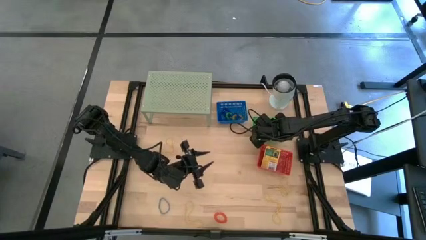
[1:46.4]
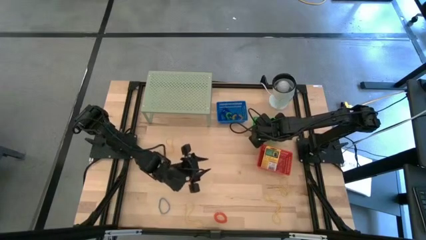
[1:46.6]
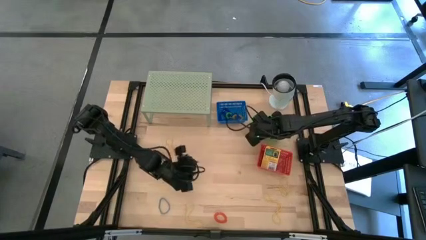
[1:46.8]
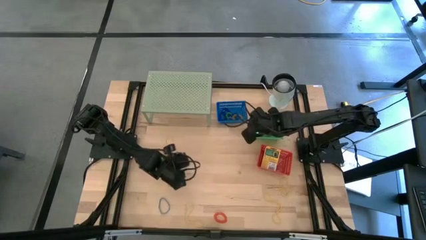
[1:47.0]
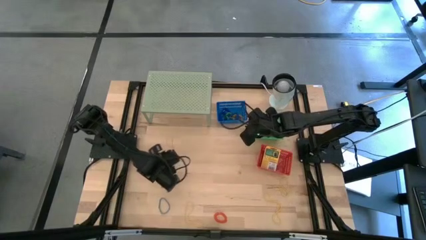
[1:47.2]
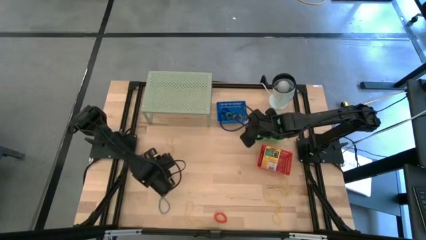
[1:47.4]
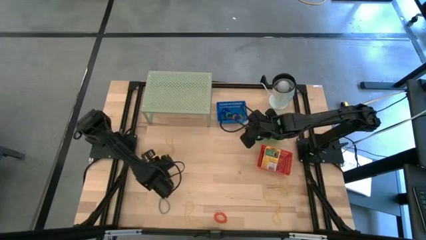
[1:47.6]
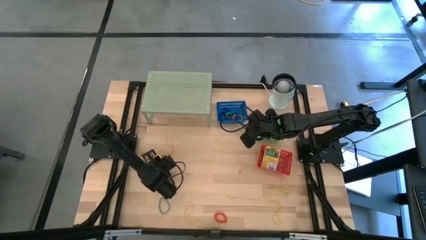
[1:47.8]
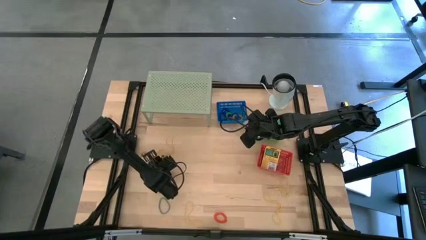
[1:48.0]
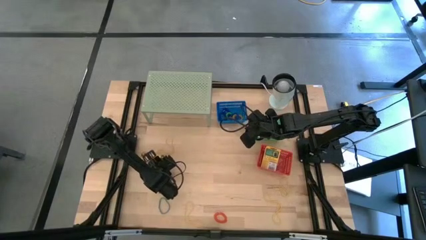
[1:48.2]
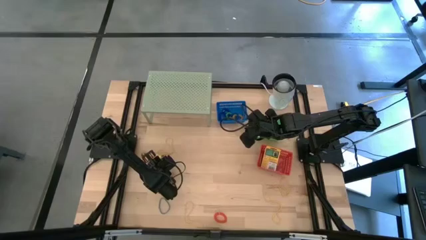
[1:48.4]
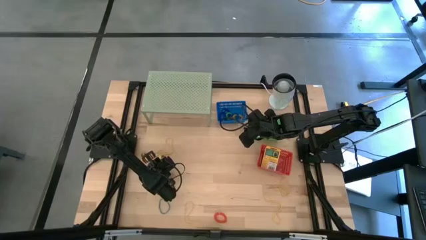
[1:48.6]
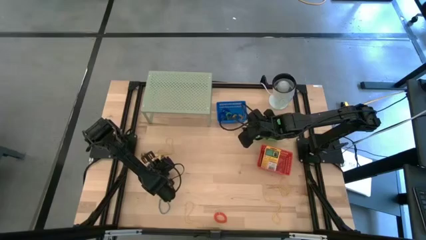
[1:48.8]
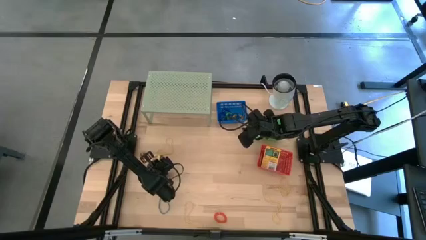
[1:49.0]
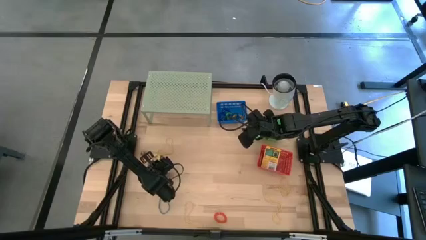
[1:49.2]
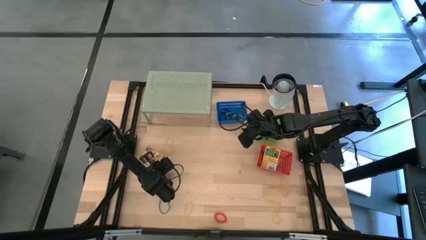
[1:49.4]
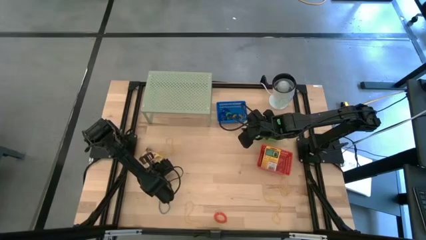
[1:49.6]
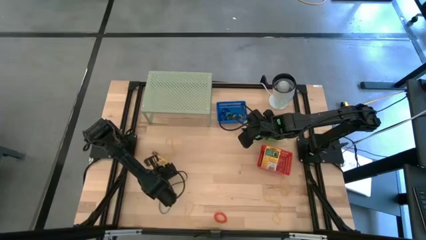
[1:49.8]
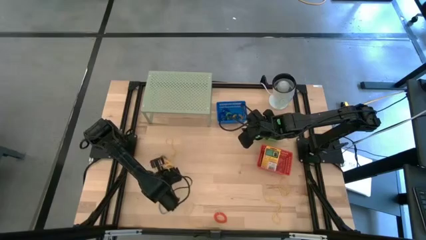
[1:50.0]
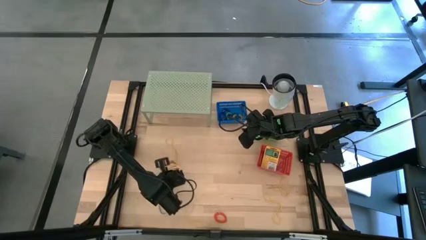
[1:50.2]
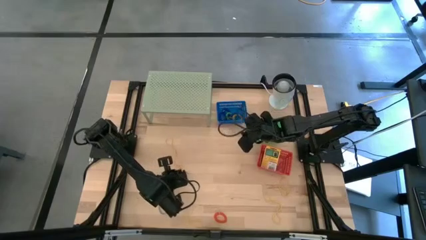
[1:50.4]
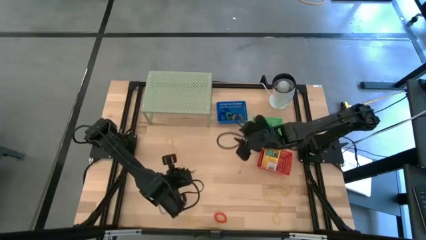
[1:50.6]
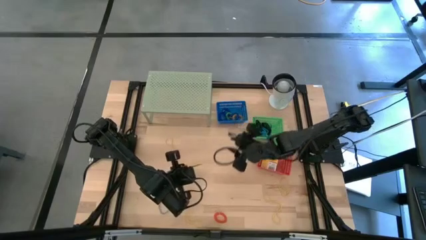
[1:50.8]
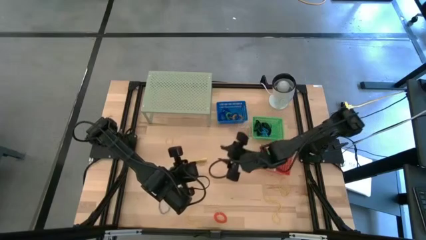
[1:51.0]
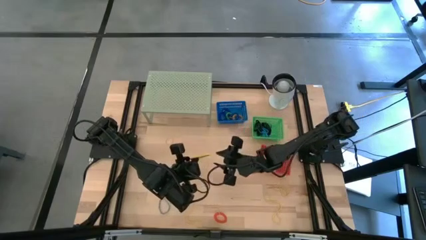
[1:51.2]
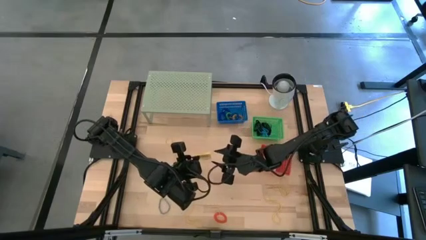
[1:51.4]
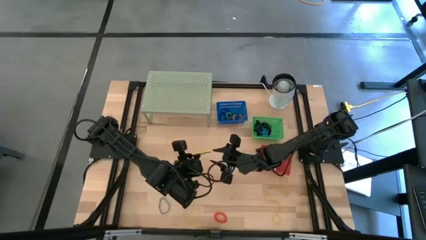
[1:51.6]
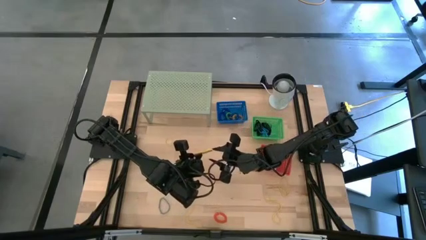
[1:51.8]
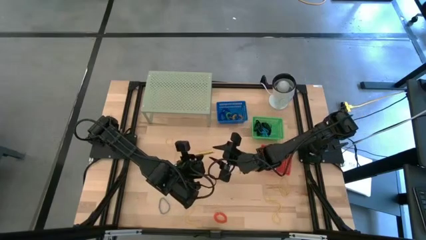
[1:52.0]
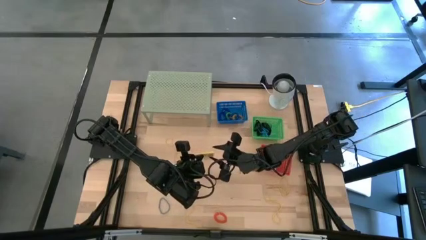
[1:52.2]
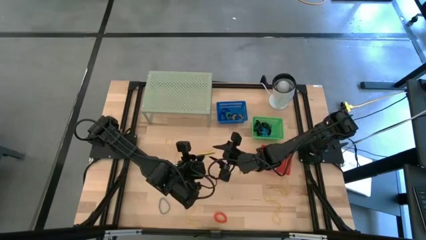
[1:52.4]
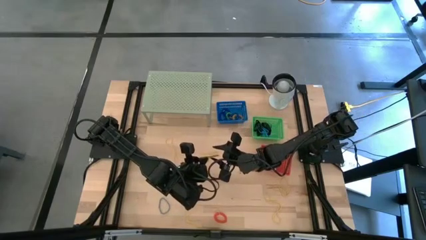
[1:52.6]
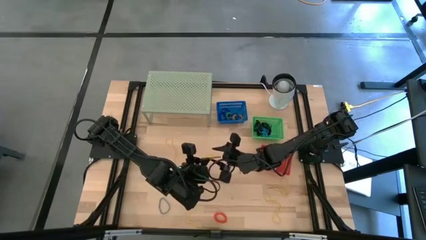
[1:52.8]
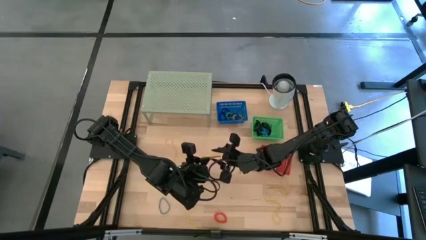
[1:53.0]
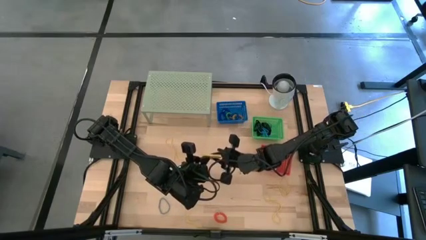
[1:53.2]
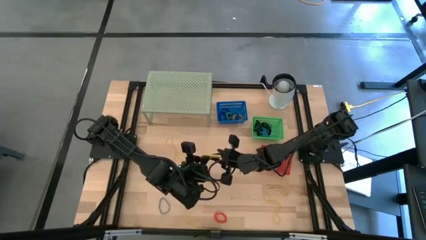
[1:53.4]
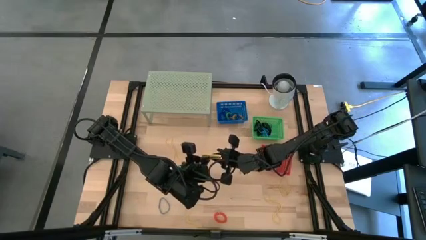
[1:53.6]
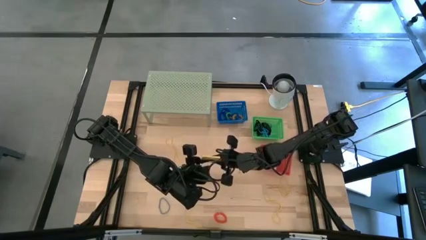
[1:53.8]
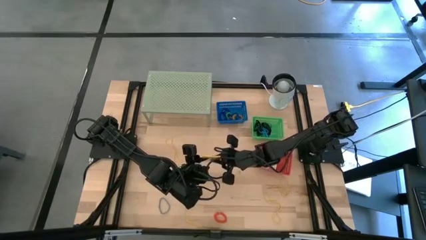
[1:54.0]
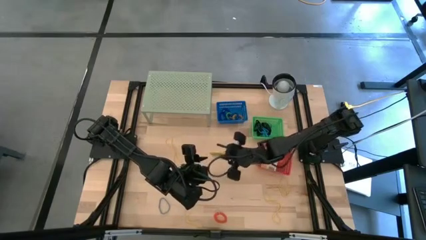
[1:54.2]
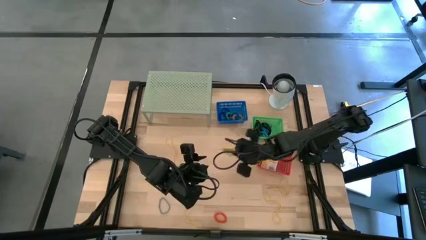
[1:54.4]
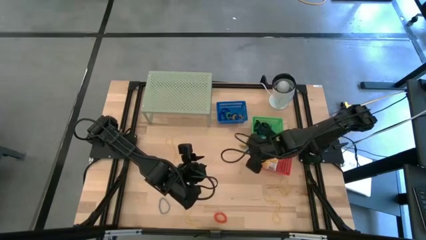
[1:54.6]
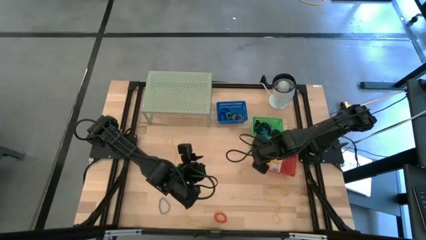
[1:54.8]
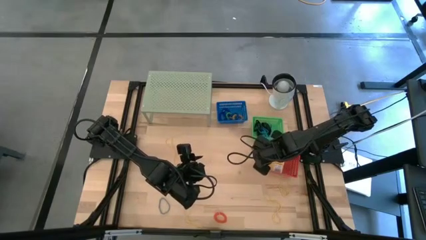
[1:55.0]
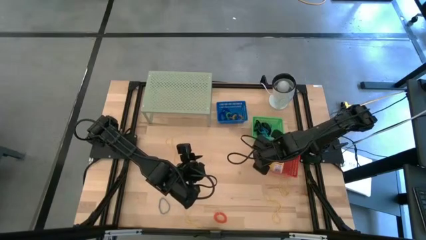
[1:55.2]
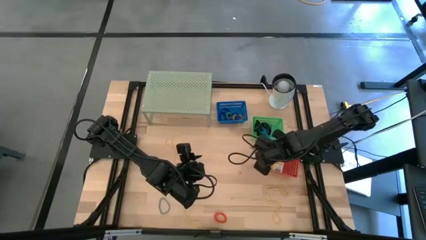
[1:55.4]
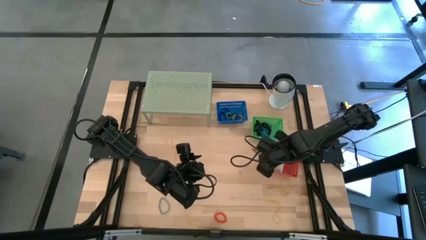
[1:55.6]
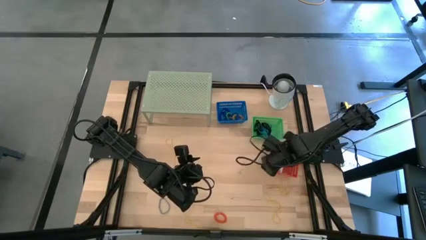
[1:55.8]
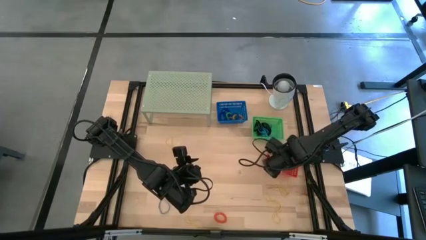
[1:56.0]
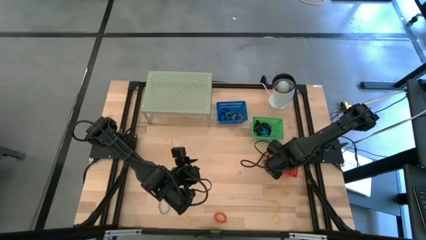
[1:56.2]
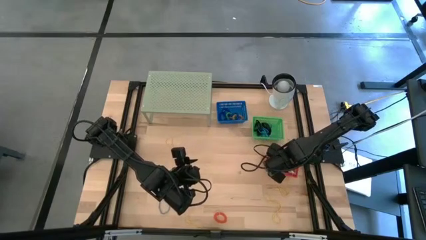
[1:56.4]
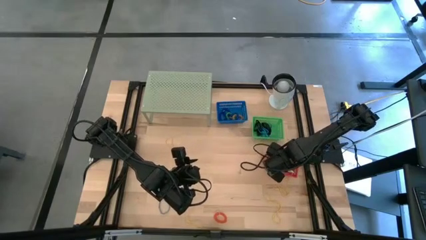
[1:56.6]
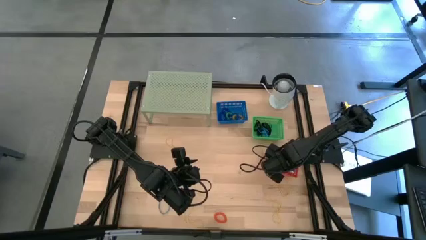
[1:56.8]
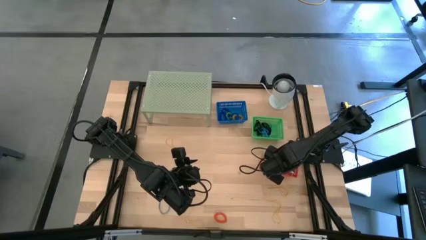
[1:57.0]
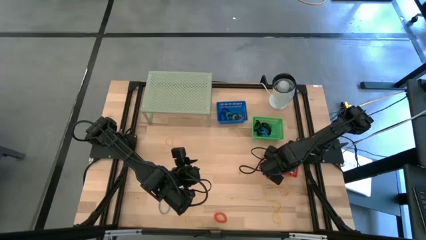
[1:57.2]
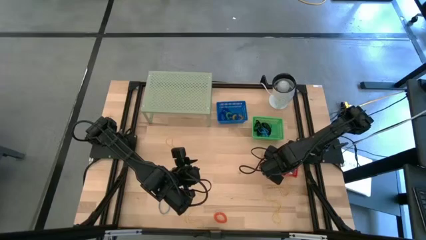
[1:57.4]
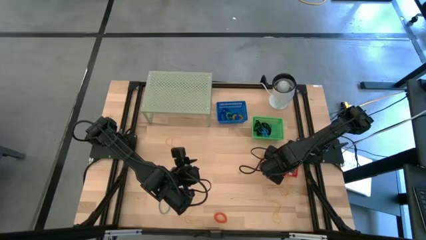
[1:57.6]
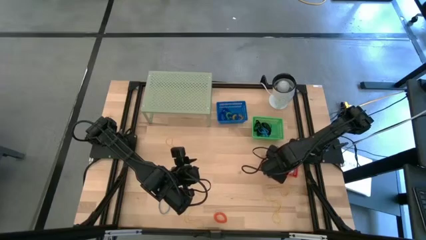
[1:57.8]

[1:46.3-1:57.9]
Task: Pick & Place Office Desk Supplies
Put the crayon box into the red bin

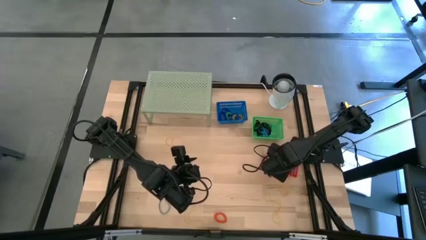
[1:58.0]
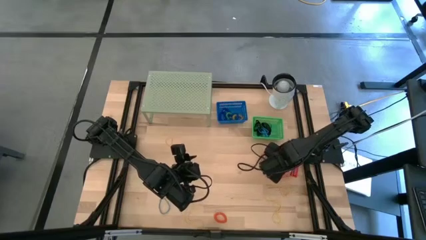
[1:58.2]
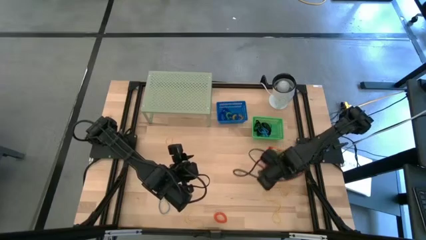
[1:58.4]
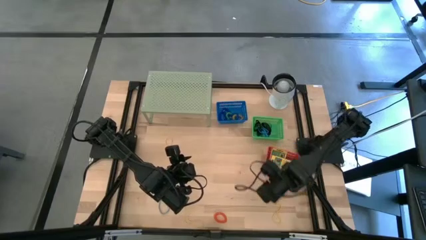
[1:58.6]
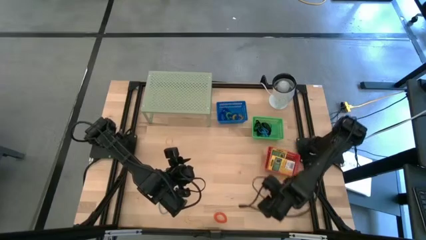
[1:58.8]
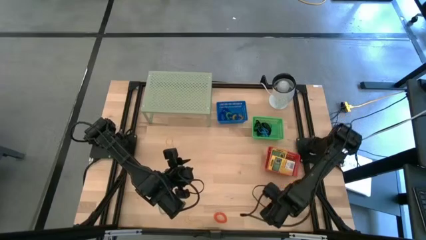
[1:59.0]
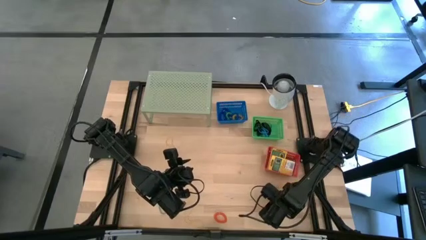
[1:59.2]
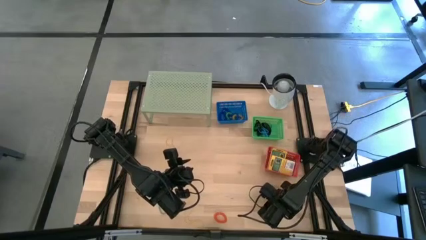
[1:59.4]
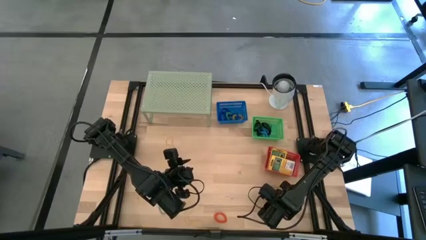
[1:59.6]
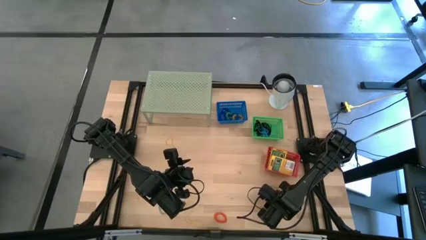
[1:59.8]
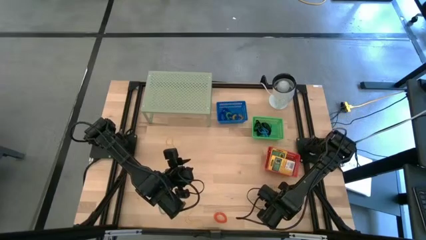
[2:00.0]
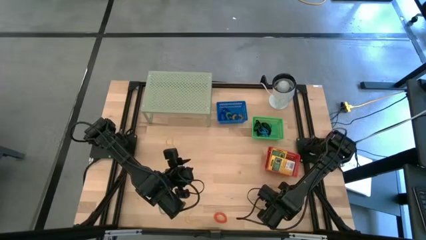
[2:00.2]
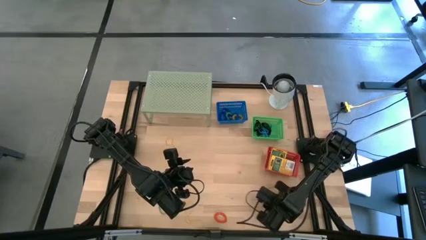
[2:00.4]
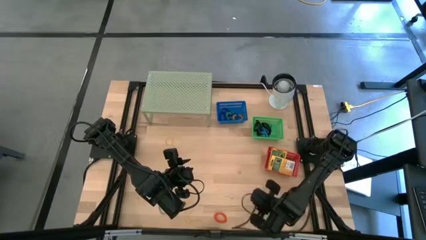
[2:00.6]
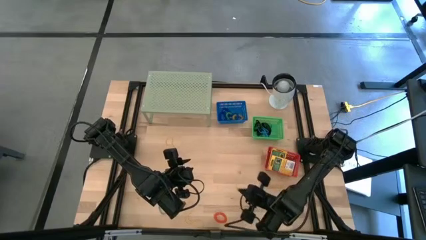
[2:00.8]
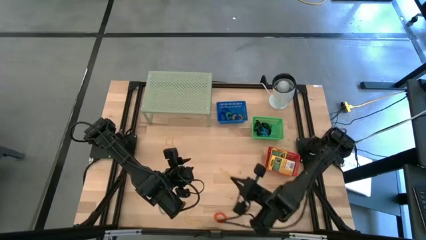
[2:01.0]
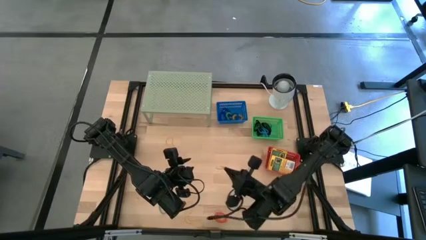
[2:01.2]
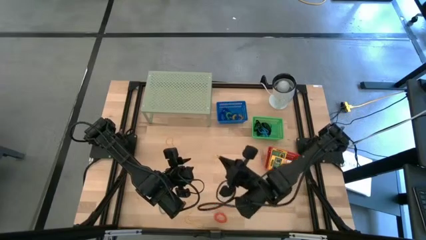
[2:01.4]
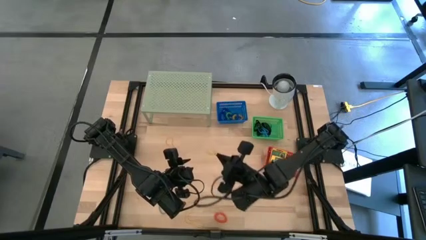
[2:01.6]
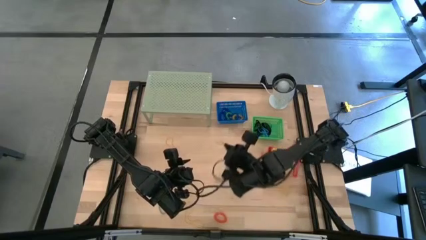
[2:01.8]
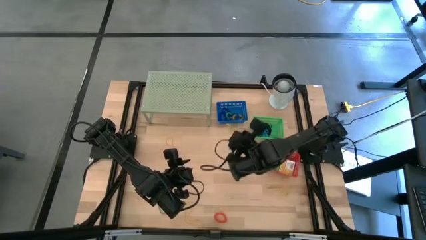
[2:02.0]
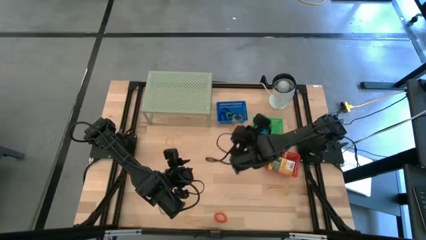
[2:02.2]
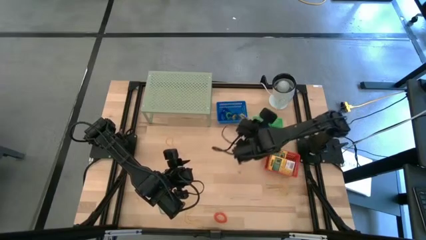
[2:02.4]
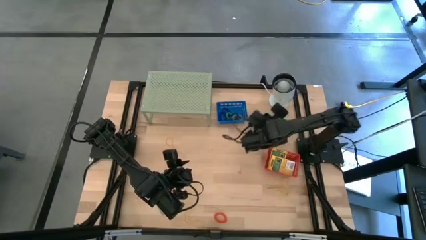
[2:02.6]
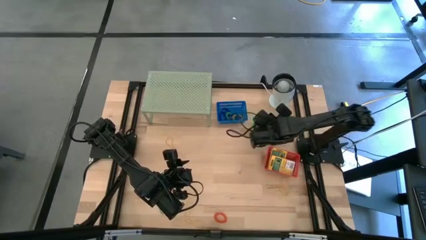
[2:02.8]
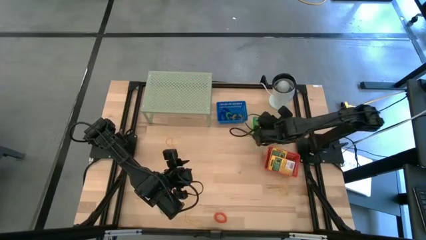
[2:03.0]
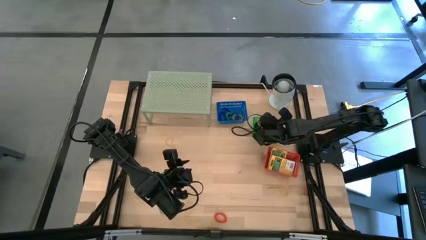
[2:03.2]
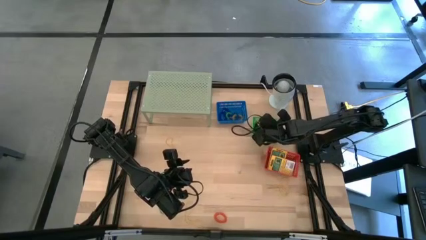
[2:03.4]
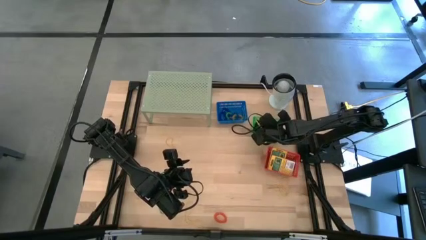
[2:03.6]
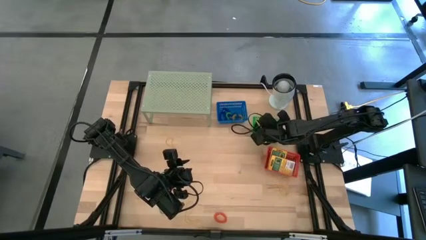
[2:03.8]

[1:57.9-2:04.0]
Put the yellow rubber band into the green bin
